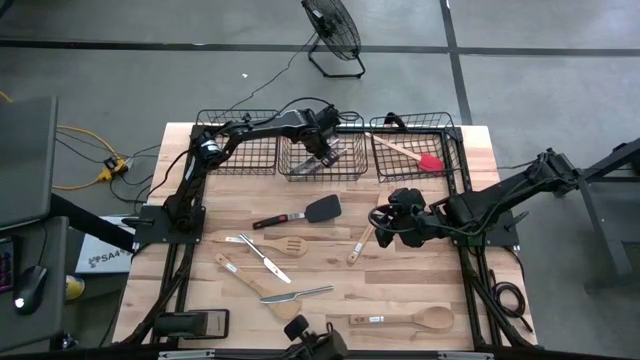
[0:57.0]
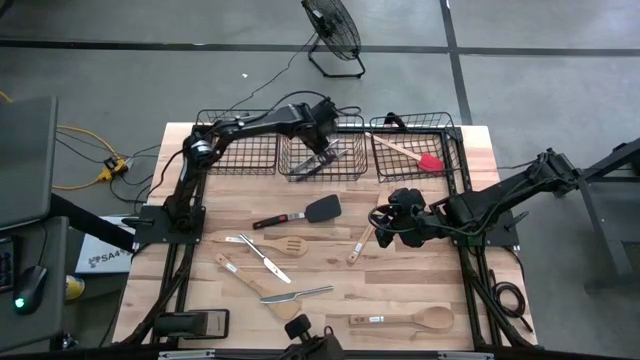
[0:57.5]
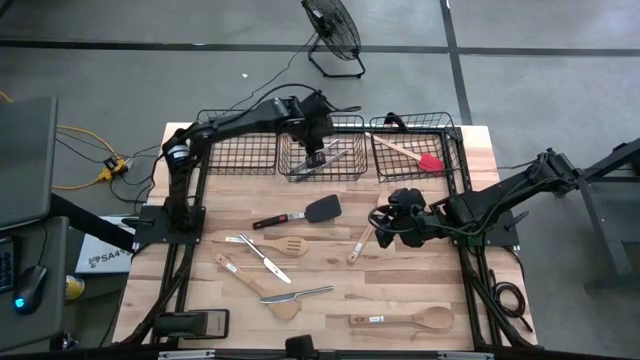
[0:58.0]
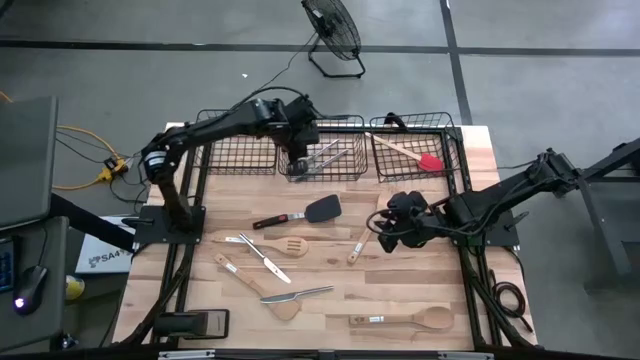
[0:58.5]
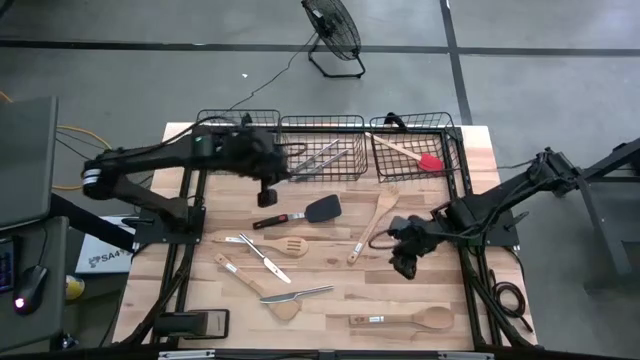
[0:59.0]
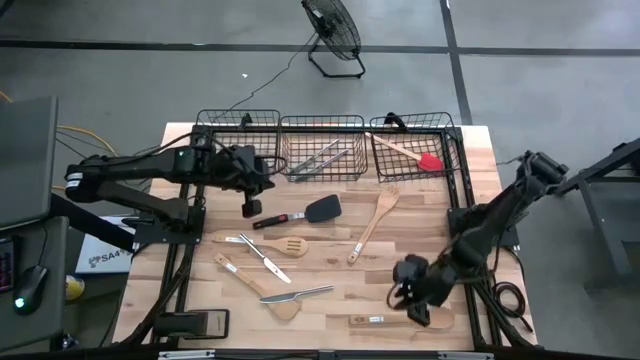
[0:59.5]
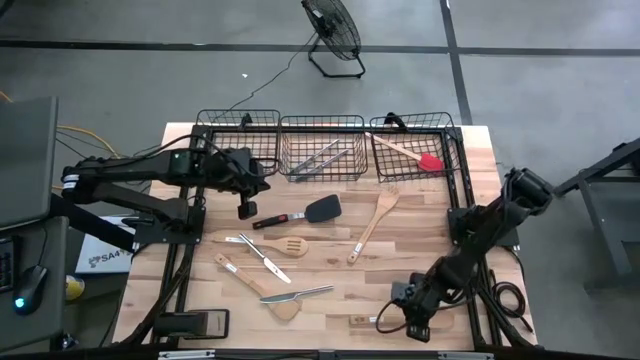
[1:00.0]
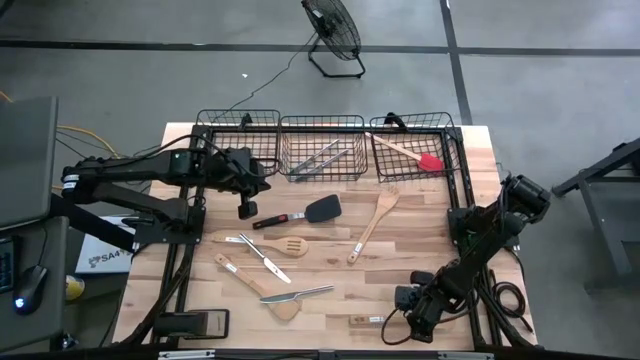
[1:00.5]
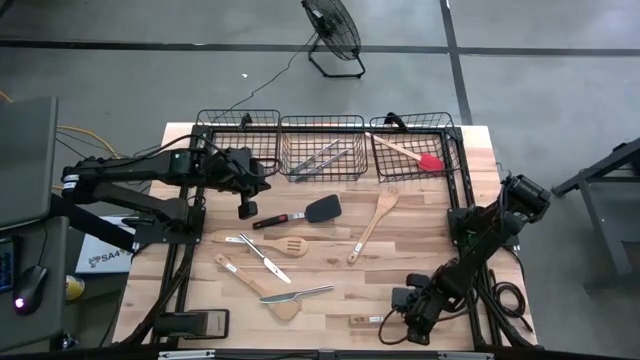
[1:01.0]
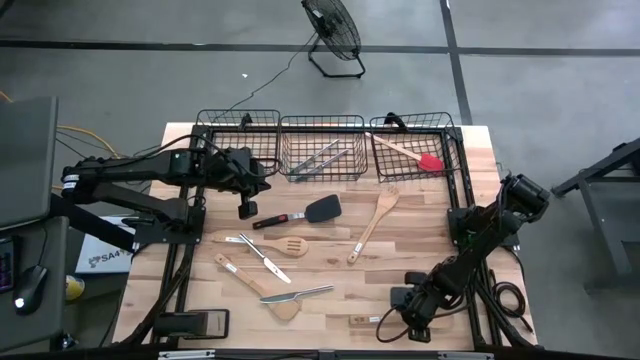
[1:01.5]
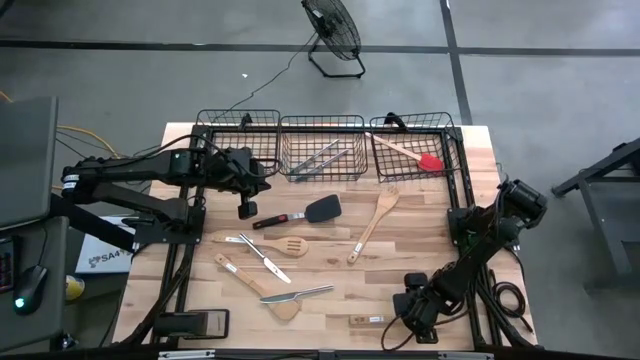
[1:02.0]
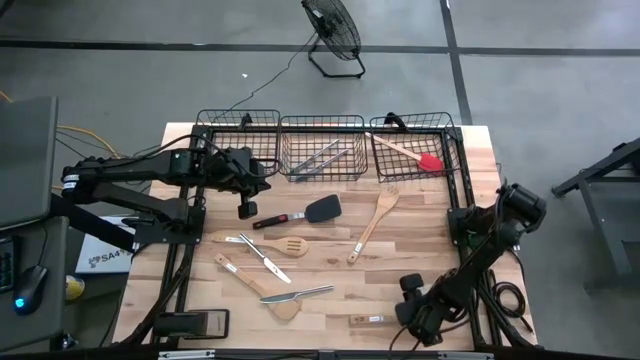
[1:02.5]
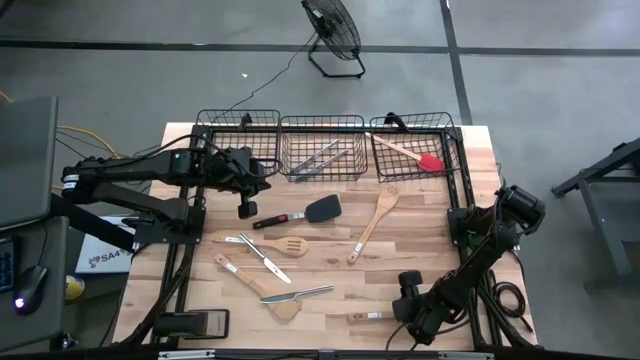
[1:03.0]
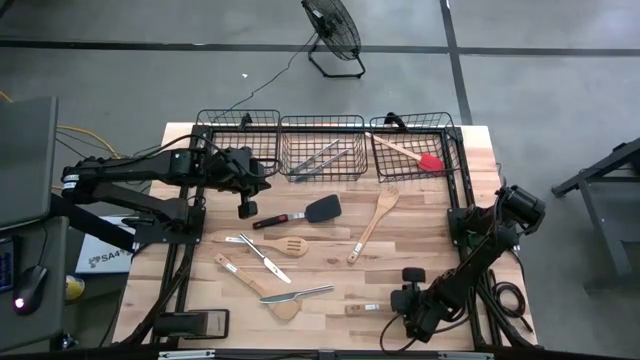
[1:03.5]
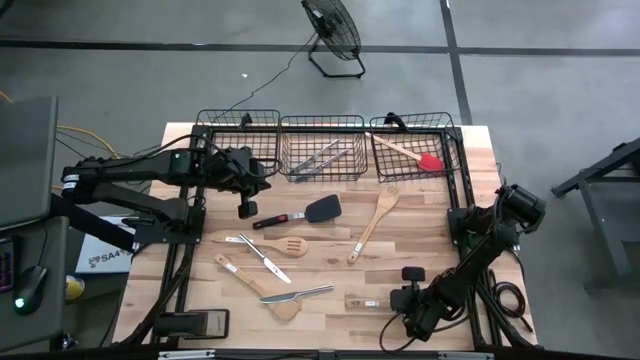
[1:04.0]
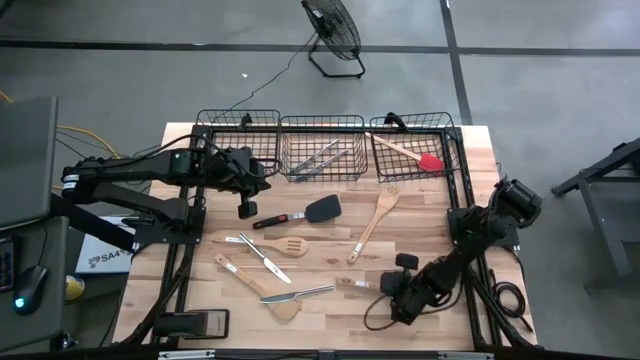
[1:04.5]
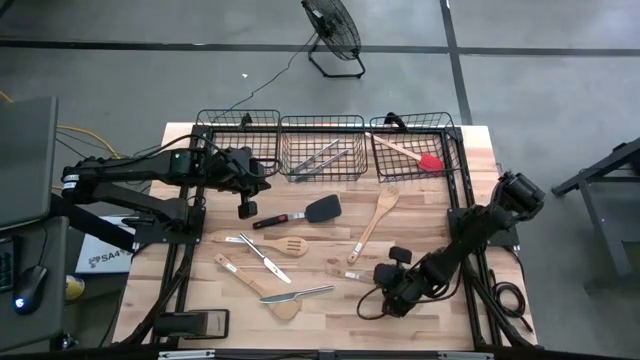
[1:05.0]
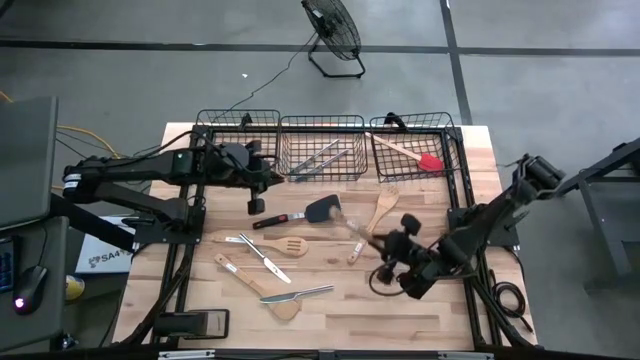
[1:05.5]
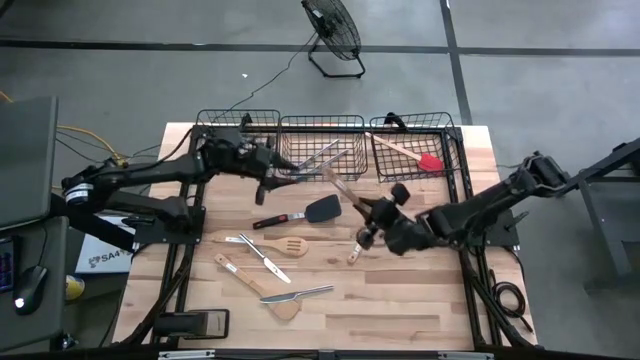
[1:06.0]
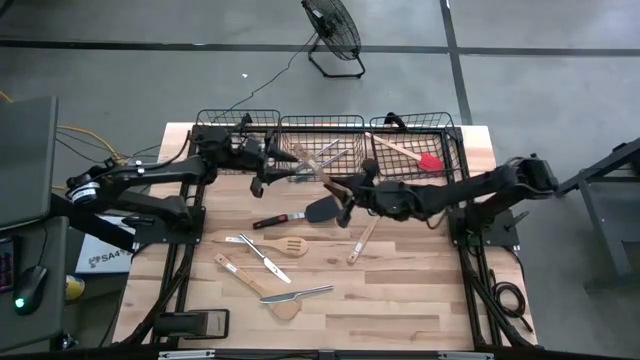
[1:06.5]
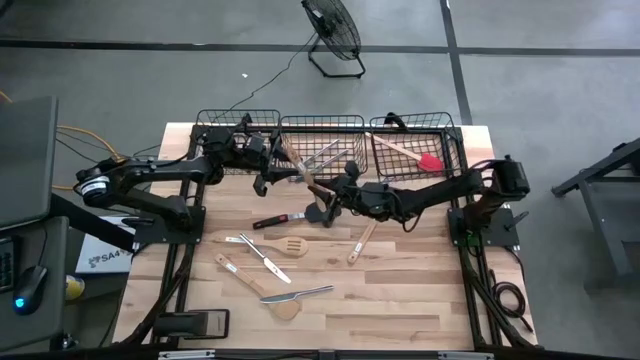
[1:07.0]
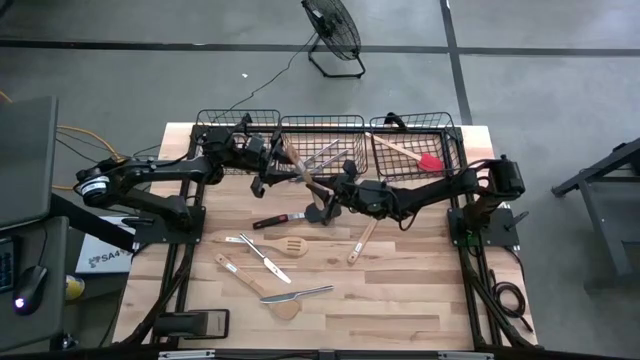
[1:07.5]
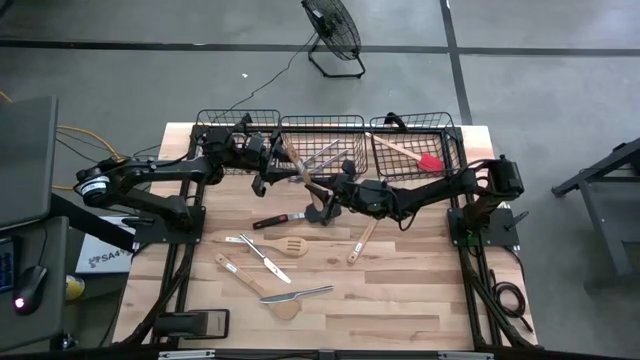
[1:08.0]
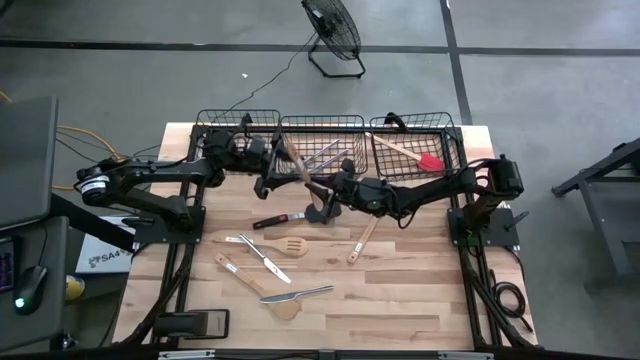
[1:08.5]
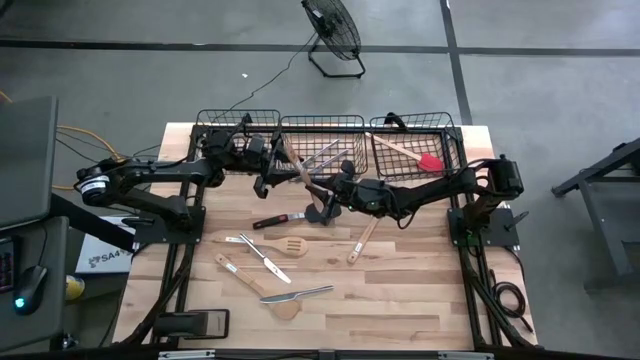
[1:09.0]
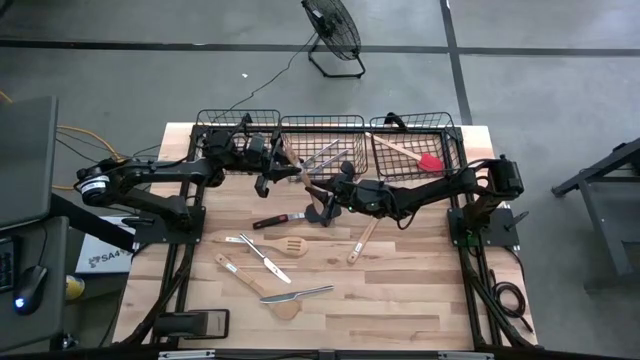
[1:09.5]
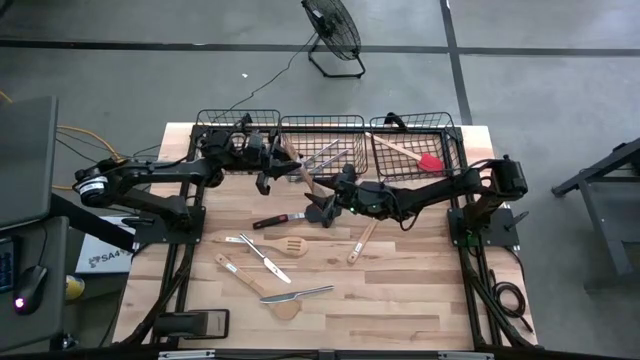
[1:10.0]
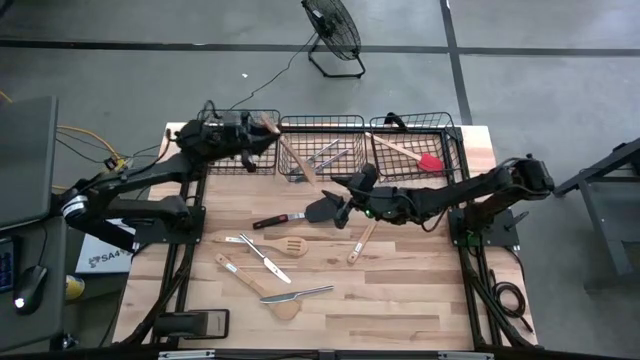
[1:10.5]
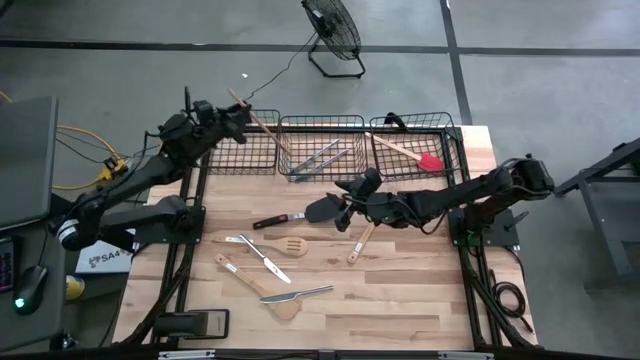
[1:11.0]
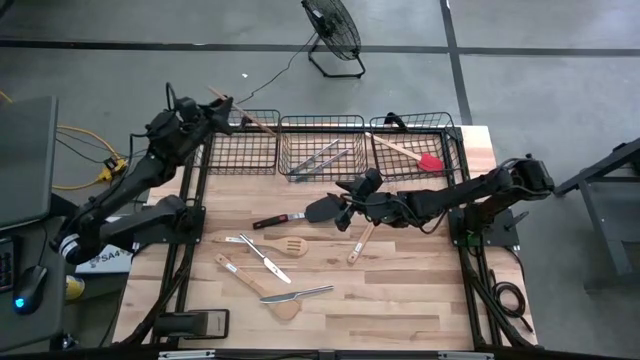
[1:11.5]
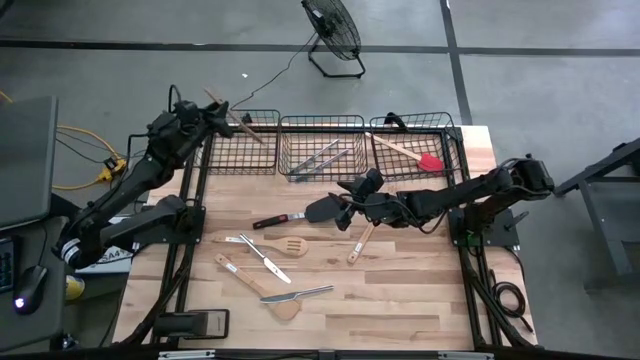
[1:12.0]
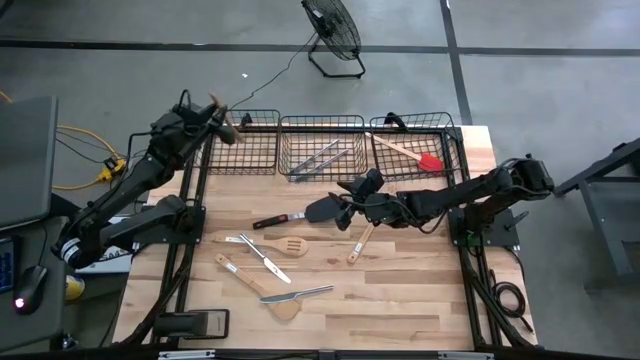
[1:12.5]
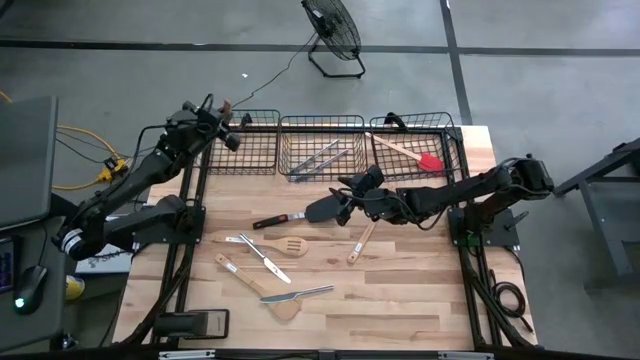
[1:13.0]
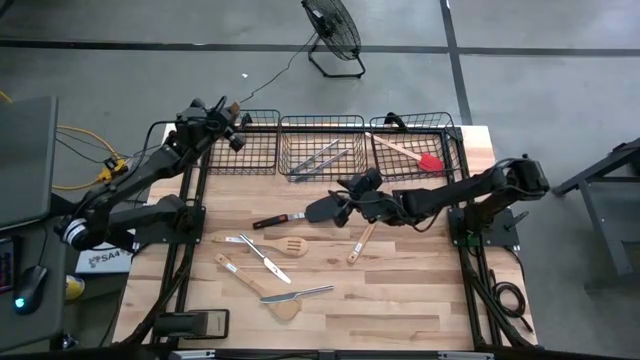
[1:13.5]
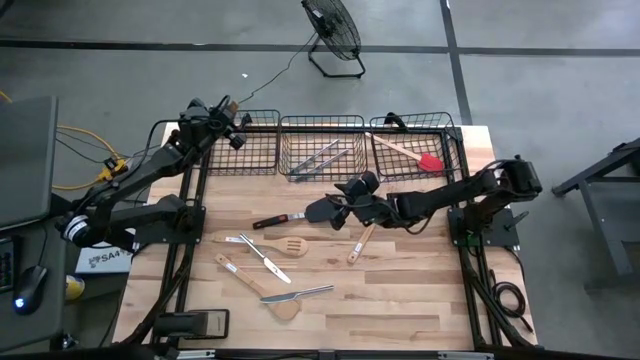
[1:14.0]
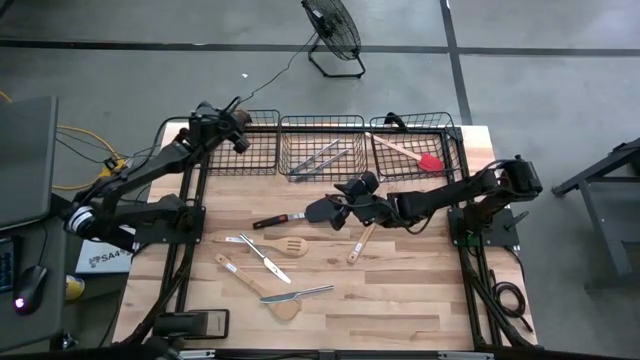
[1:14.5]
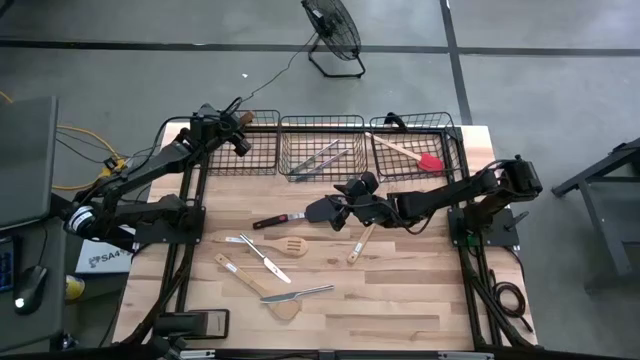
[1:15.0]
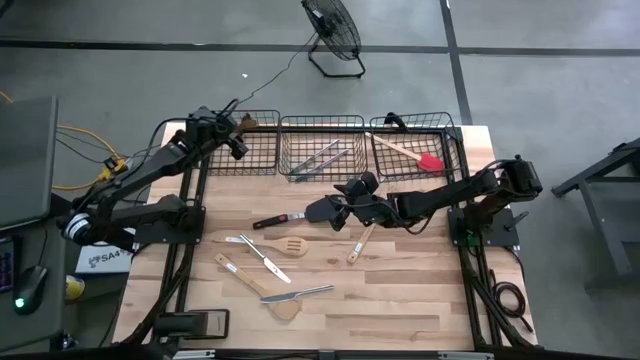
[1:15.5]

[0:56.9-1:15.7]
Task: Pick & Place Kitchen Items
Put the brown serving spoon into the left mesh basket

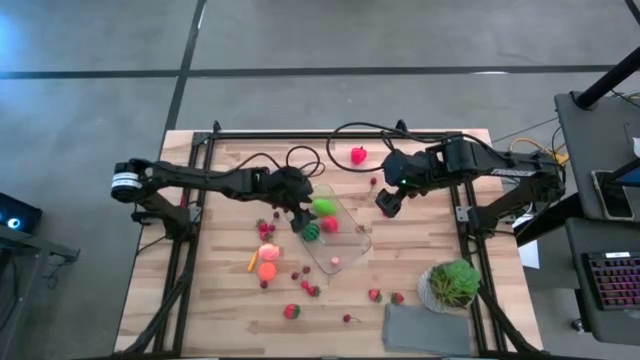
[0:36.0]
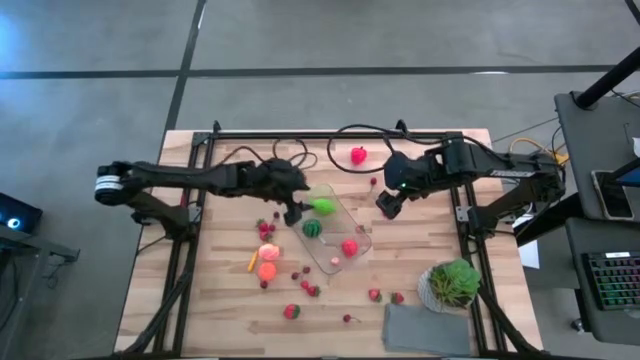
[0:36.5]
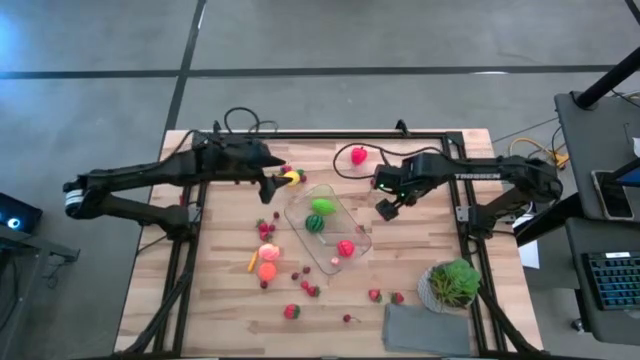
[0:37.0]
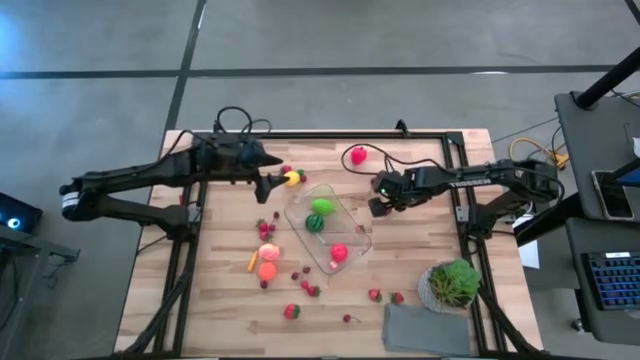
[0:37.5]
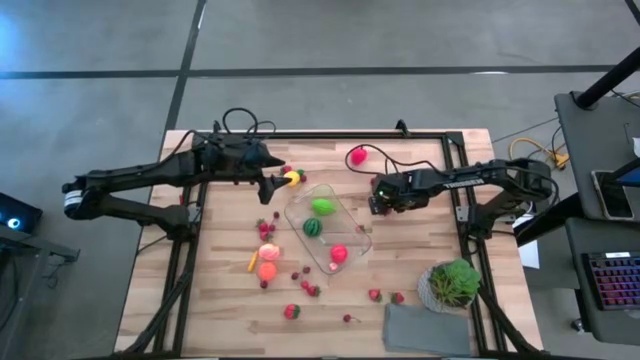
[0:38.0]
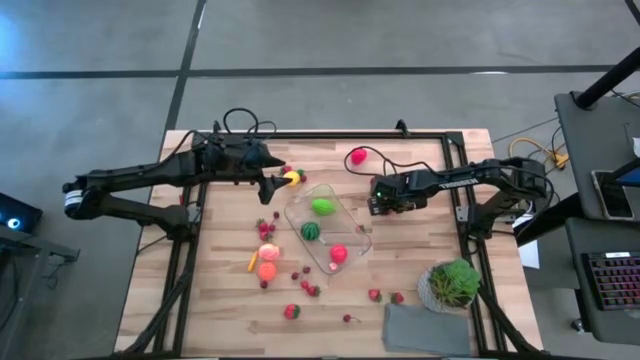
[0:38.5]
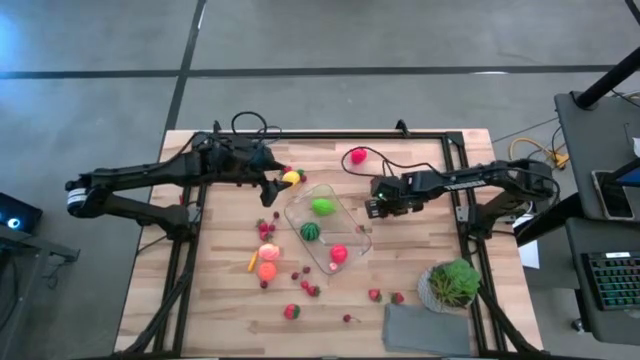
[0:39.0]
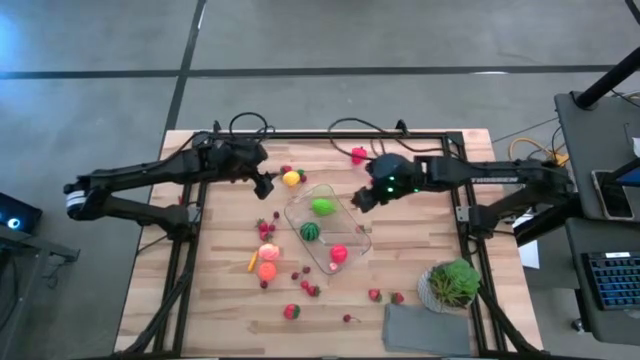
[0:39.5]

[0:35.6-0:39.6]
Task: Pick and placing Produce into tupperware
Put the red strawberry into the transparent bin
